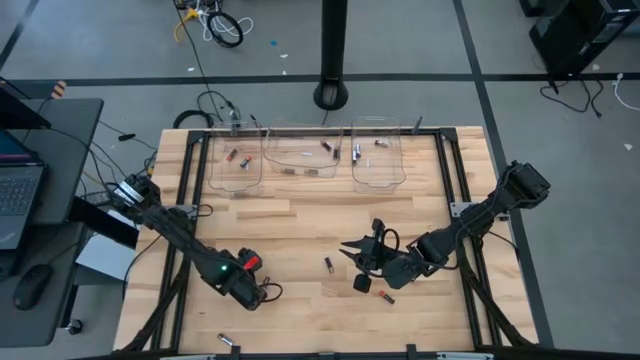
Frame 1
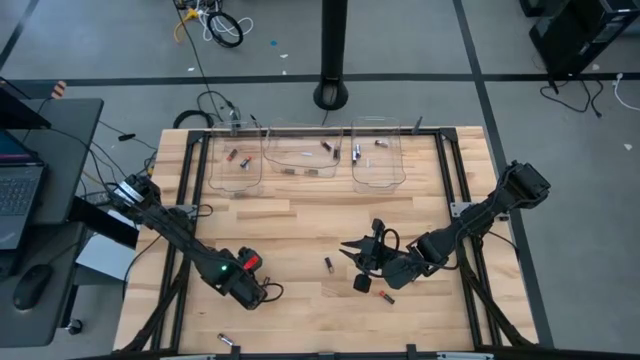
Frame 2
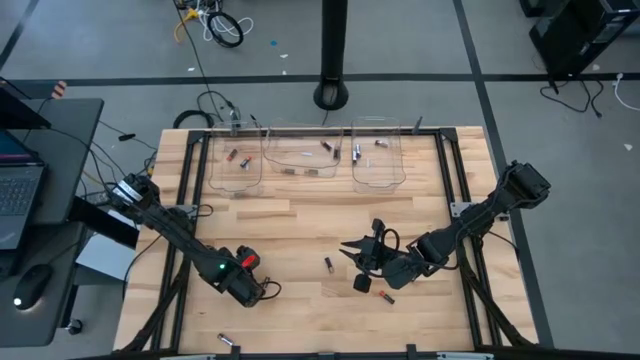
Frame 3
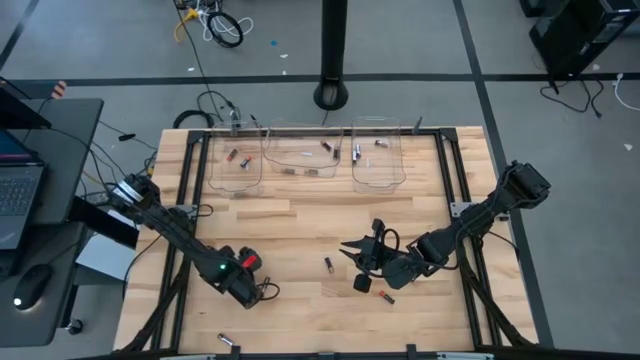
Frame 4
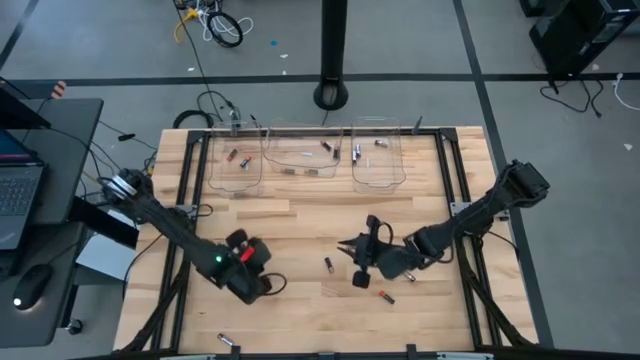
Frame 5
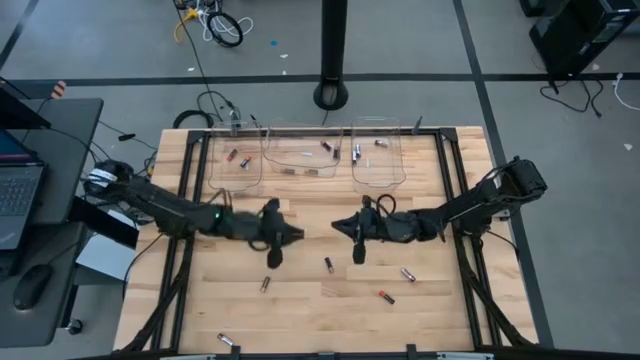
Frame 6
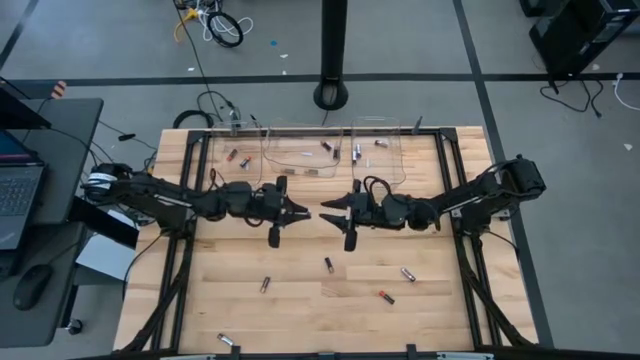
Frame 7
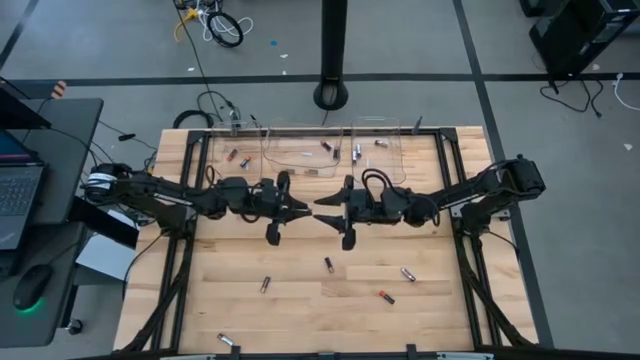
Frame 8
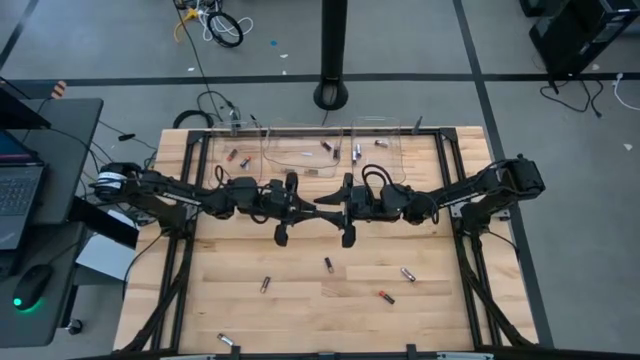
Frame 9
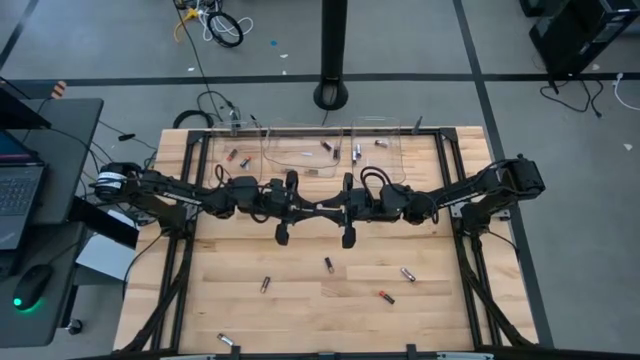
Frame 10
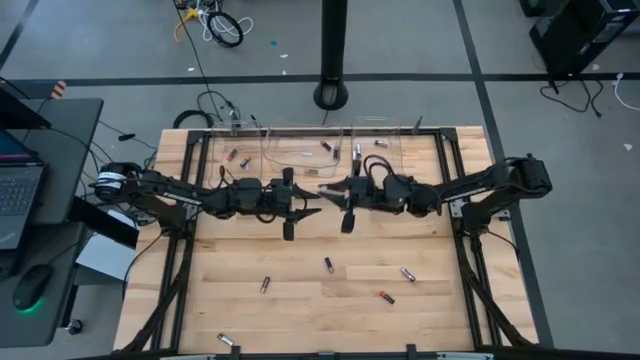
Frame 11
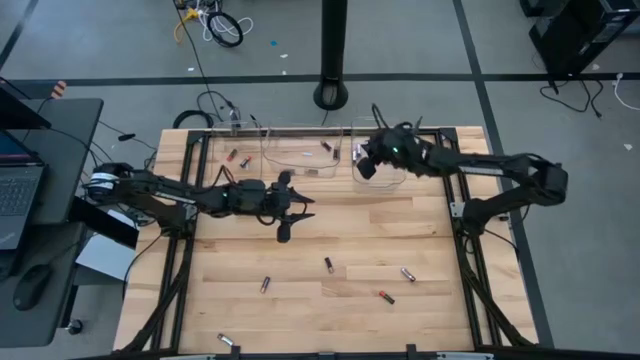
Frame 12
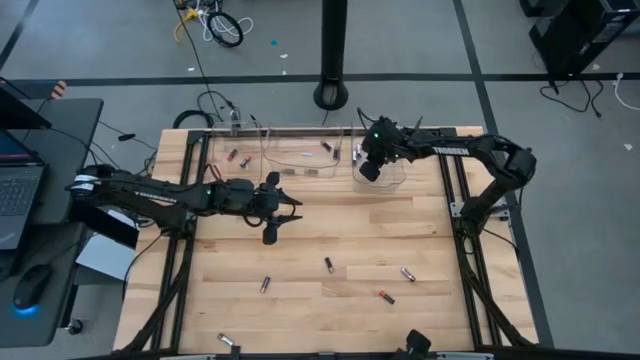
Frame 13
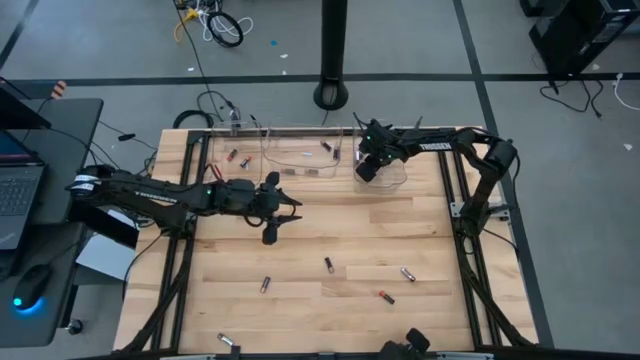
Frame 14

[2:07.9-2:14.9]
Task: Sort batteries
Put the silver battery into the right transparent bin

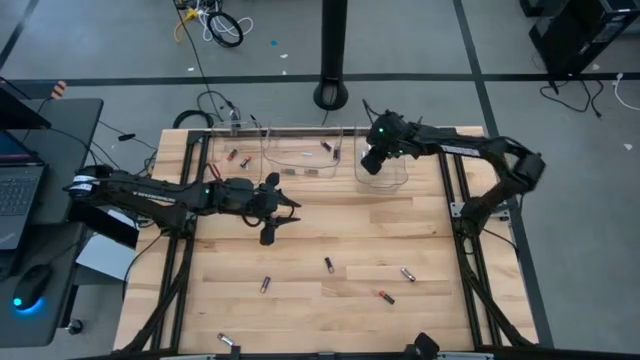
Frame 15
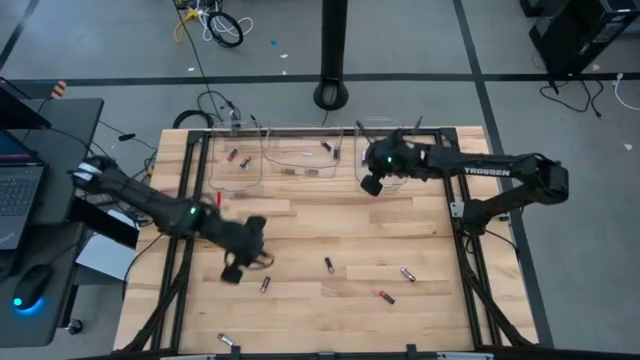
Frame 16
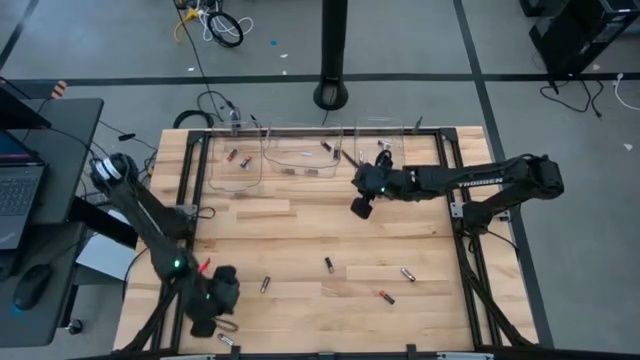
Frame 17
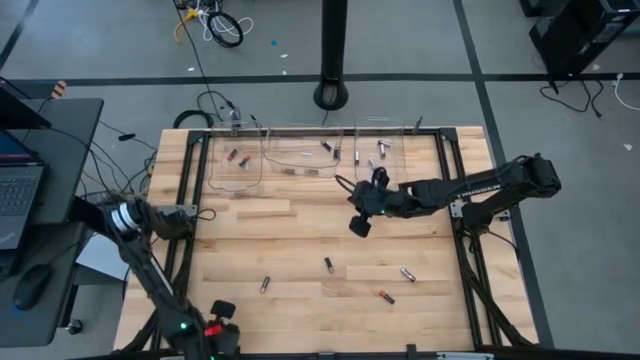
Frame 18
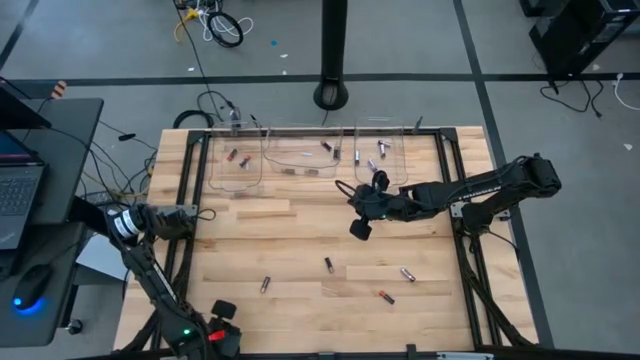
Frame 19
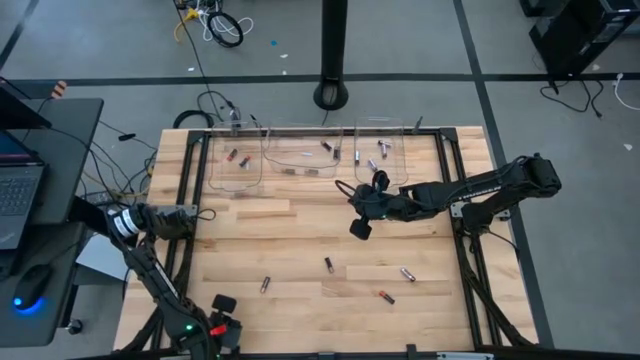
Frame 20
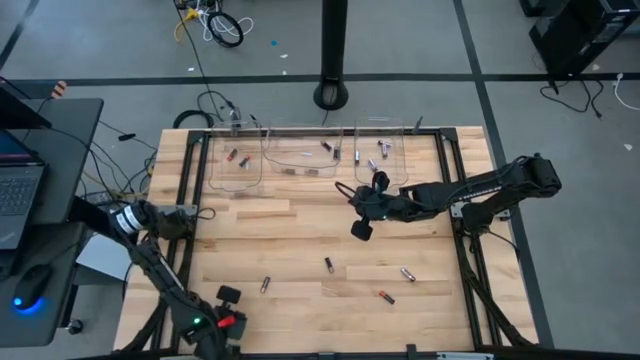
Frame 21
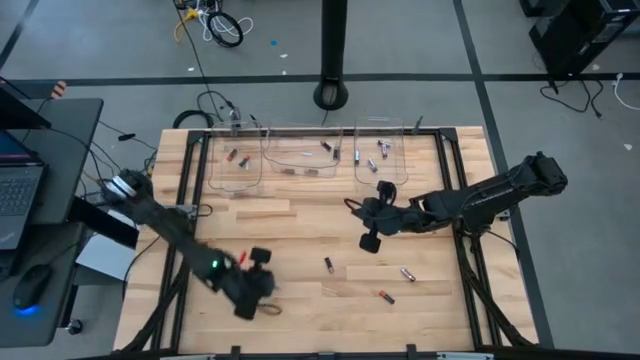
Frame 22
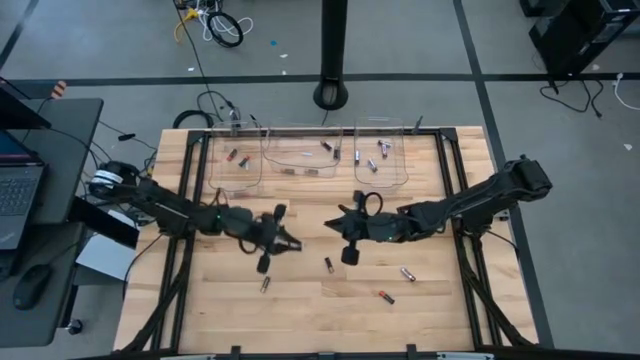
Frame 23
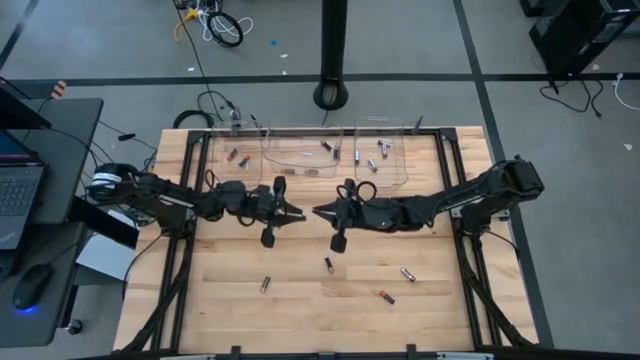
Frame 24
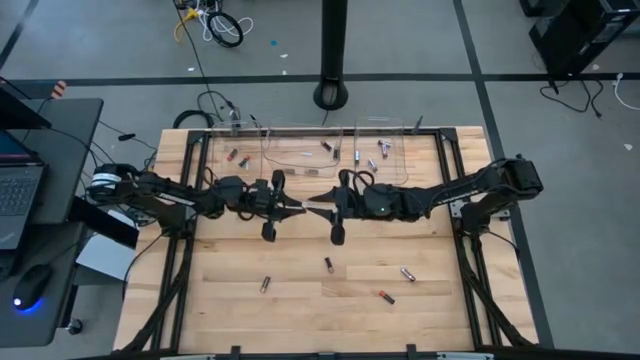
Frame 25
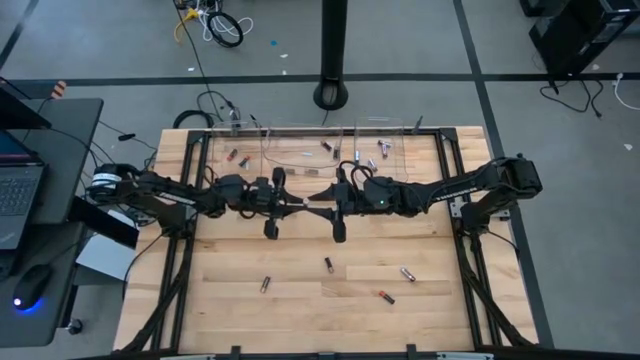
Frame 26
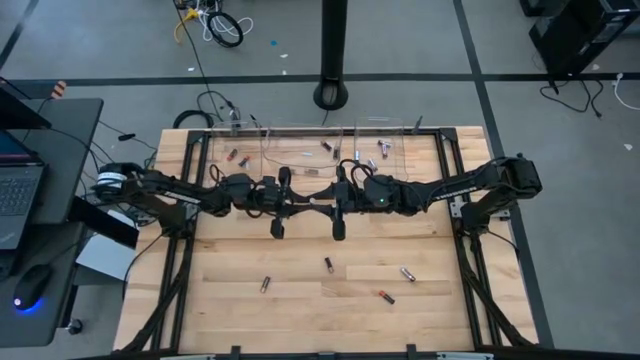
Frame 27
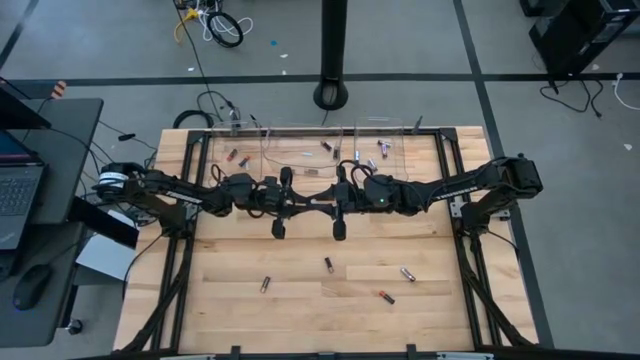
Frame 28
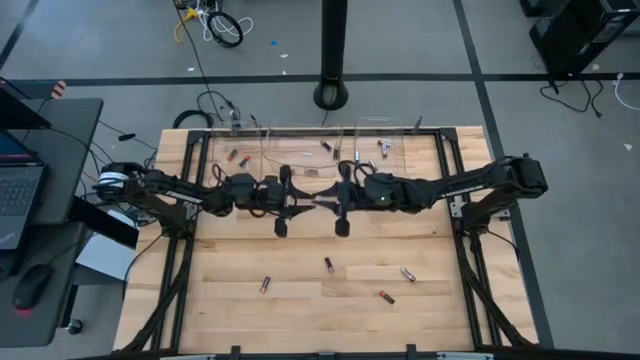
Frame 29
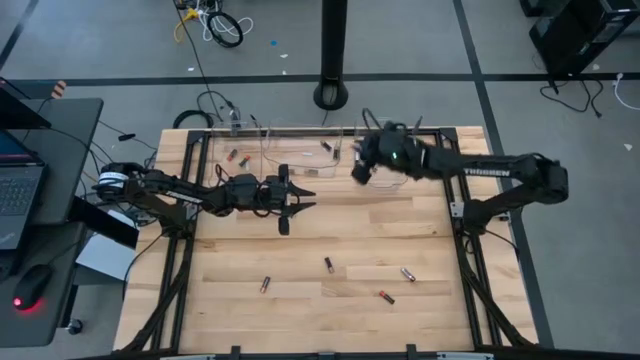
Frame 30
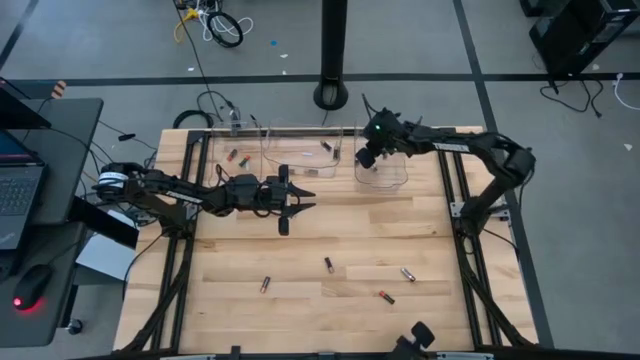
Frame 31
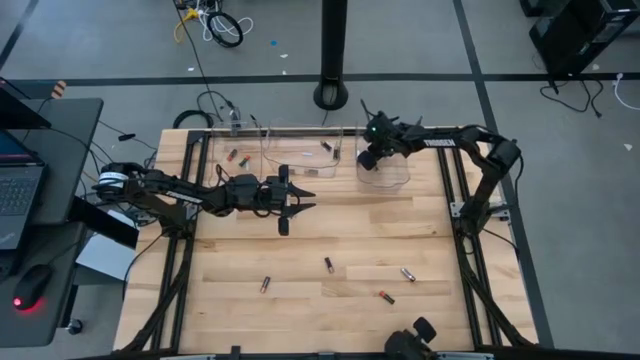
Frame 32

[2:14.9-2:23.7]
Put the silver battery into the right transparent bin

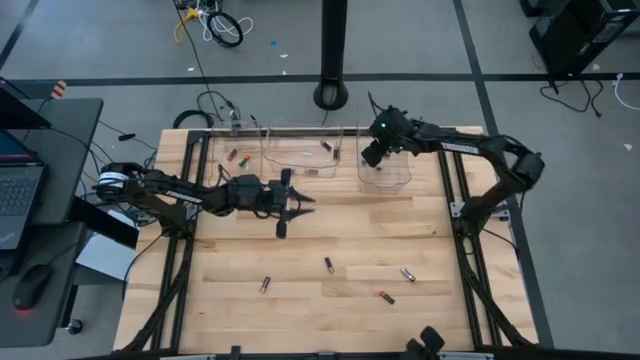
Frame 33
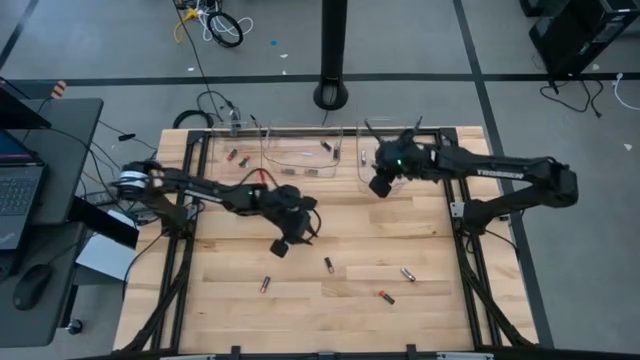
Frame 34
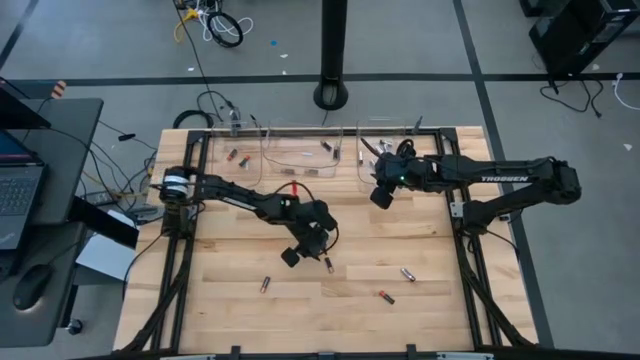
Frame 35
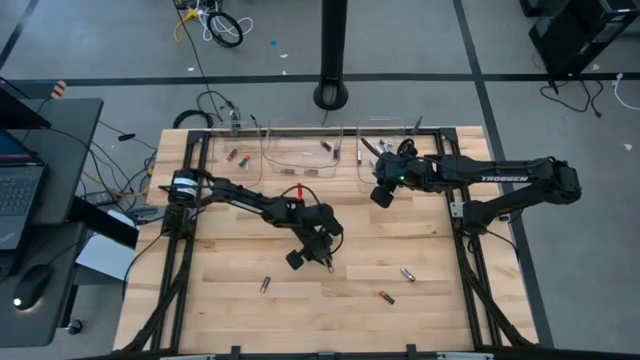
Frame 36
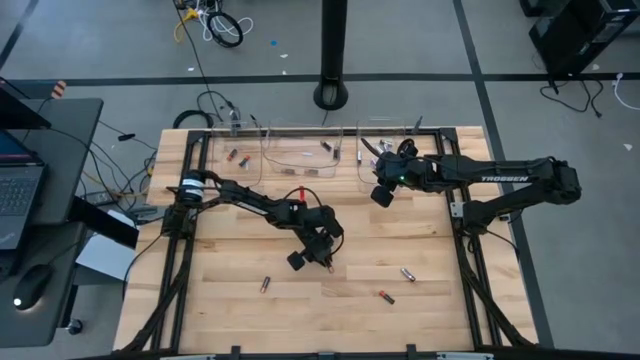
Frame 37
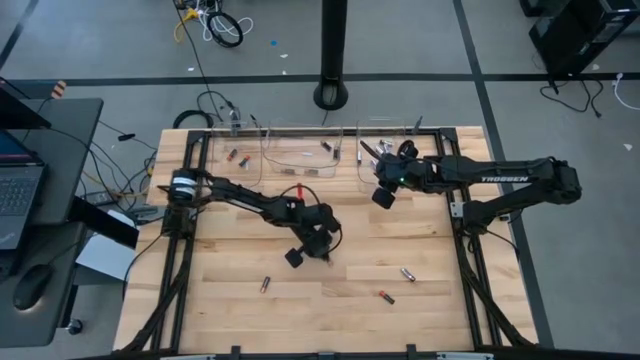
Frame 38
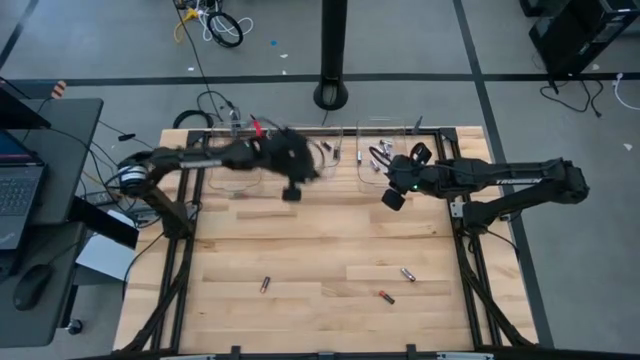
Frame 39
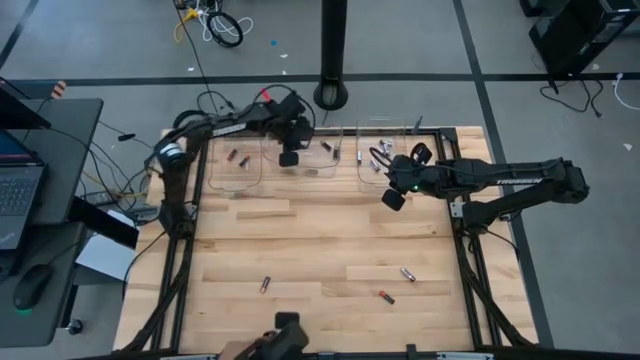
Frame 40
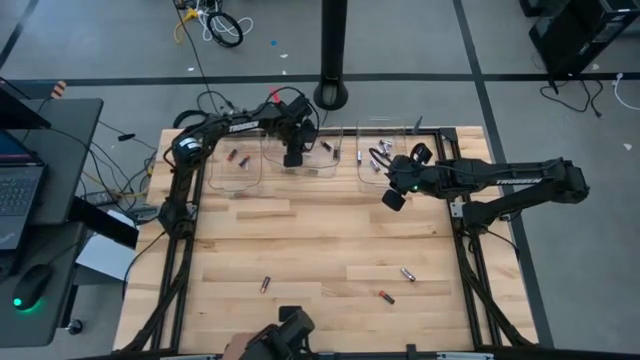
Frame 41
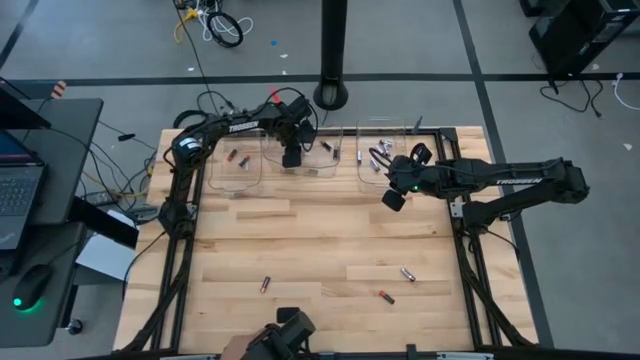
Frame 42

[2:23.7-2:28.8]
Put the black battery into the right transparent bin
